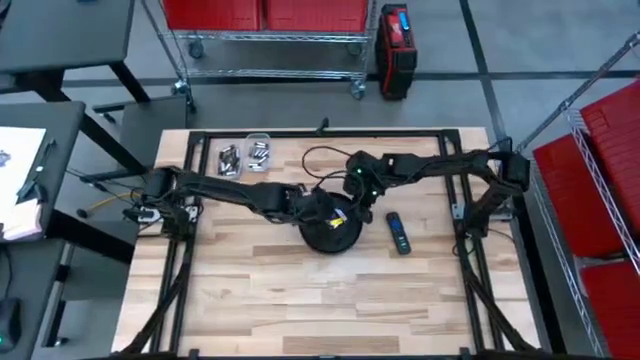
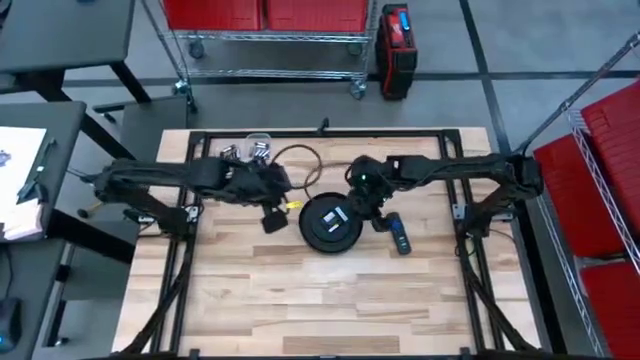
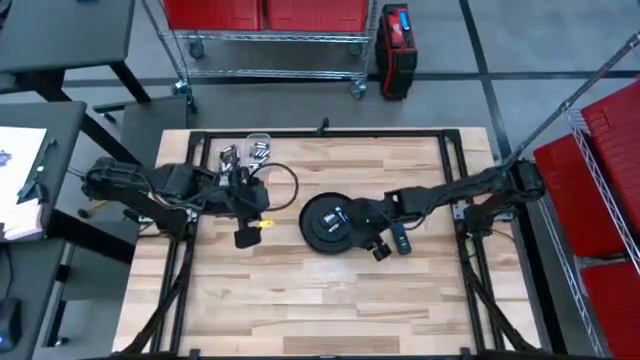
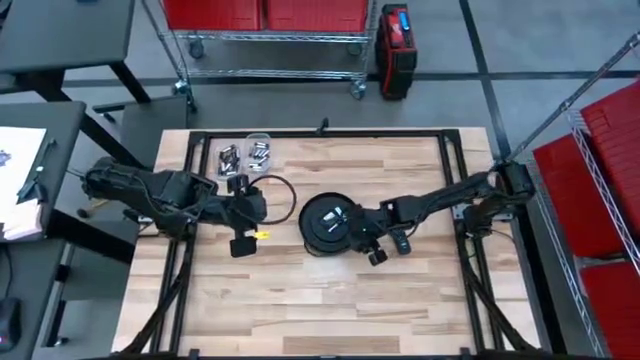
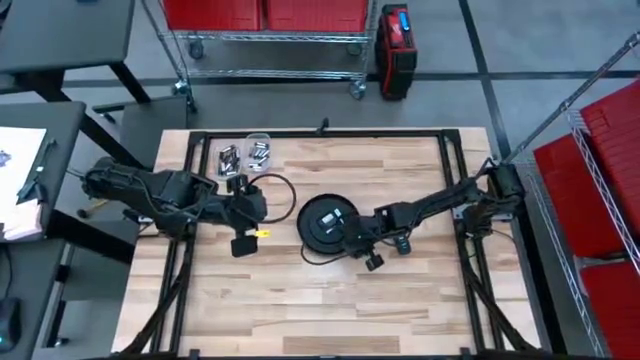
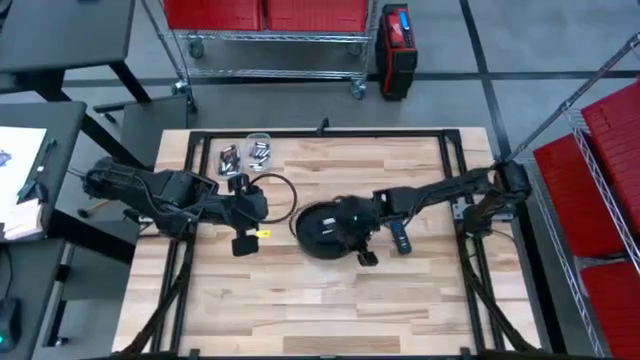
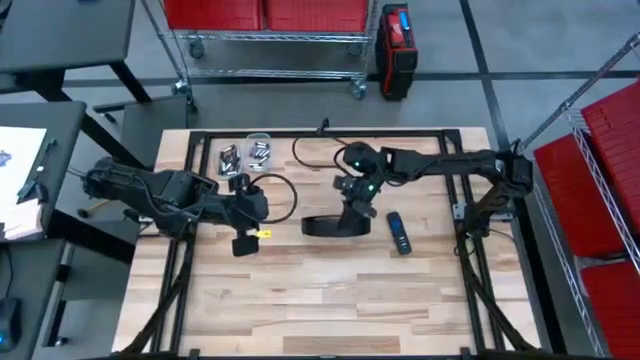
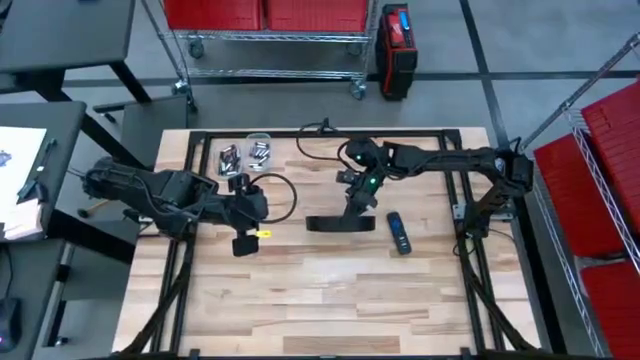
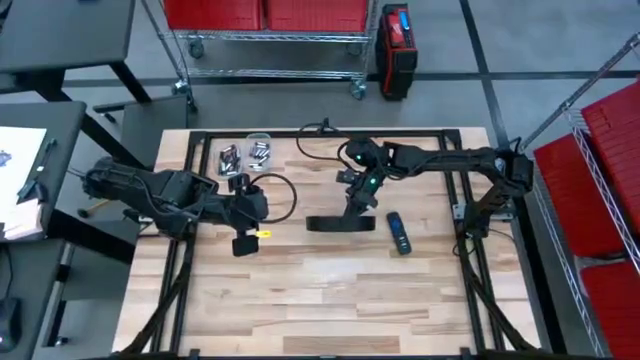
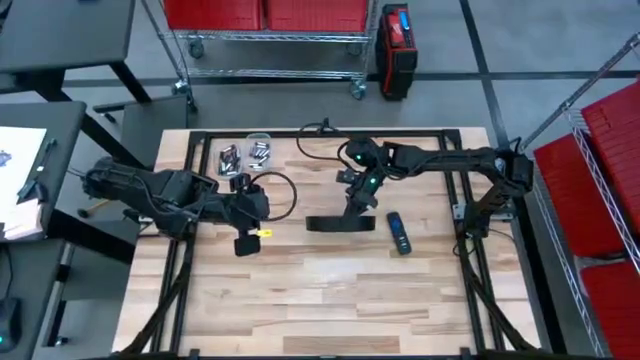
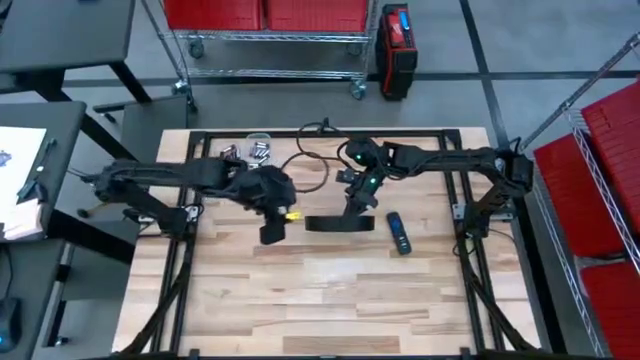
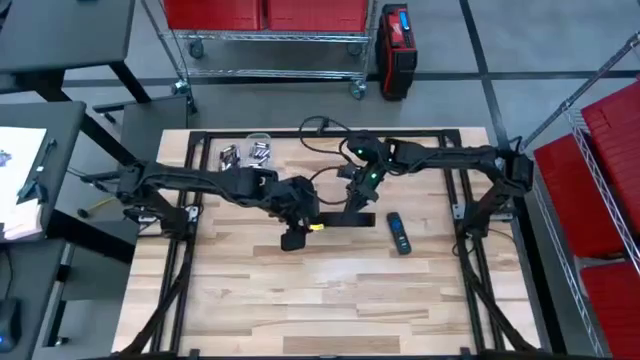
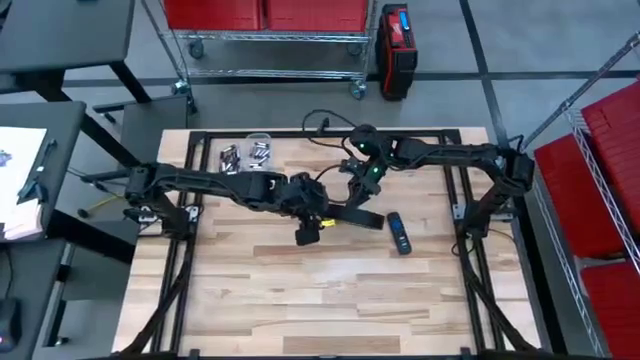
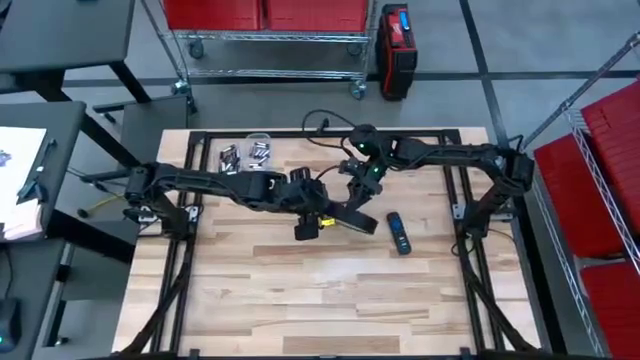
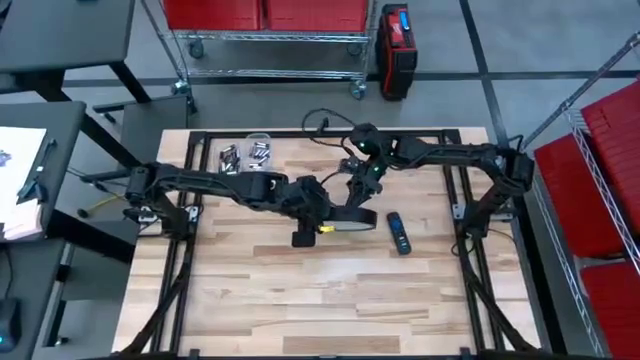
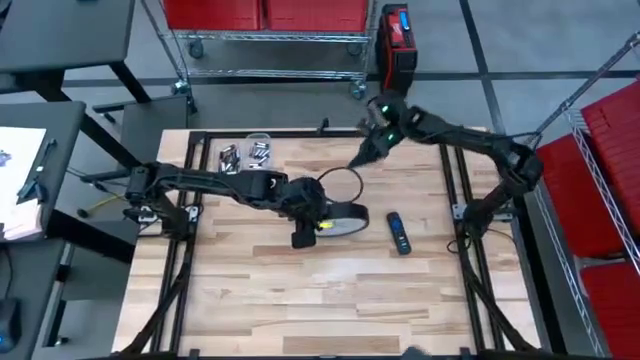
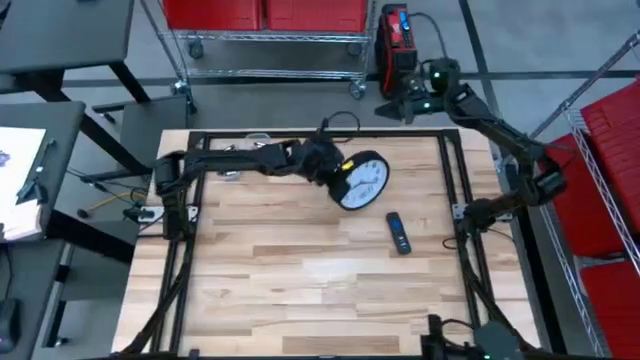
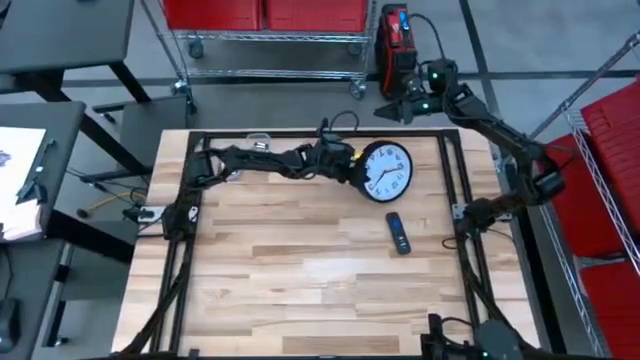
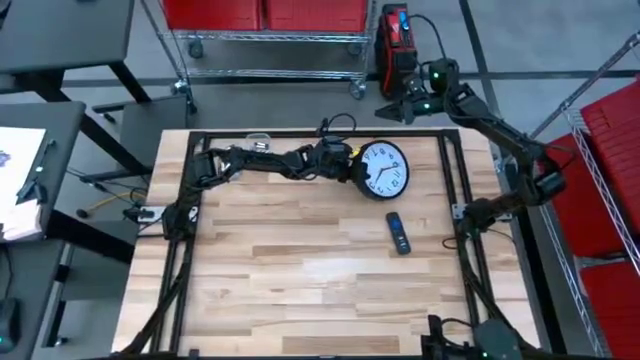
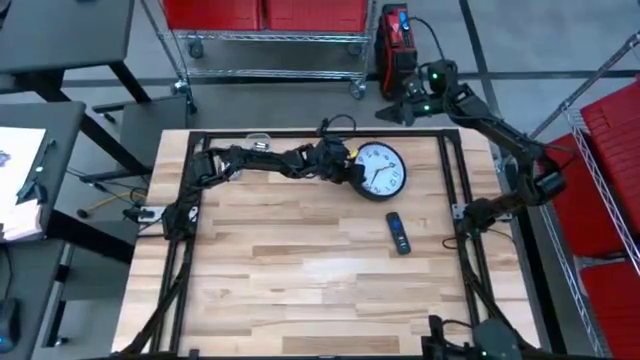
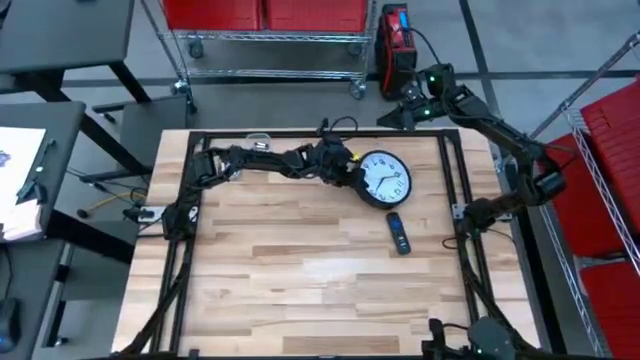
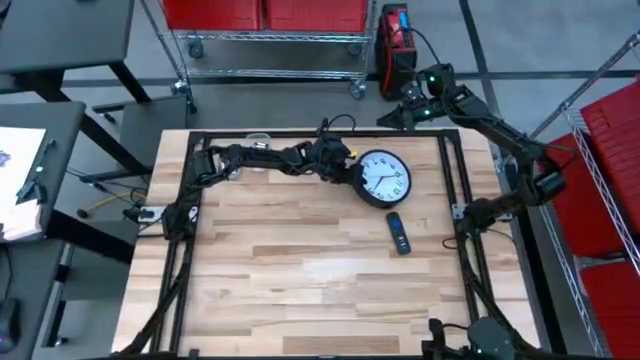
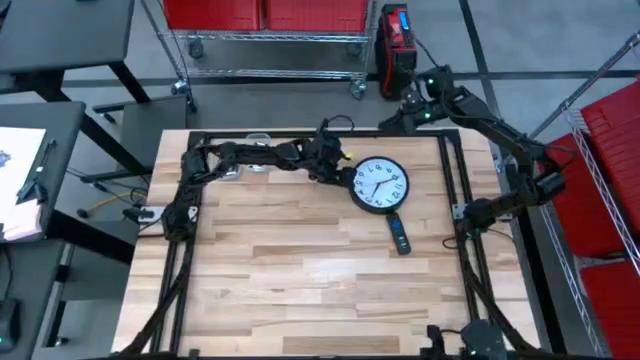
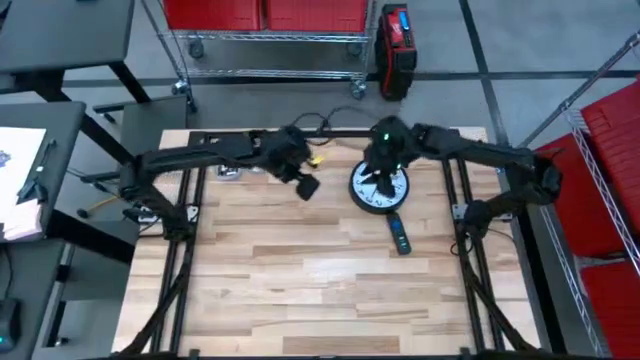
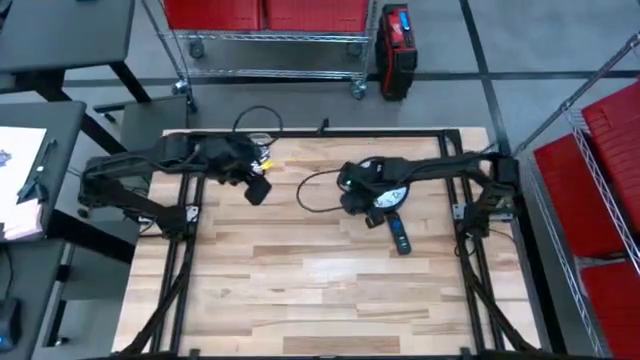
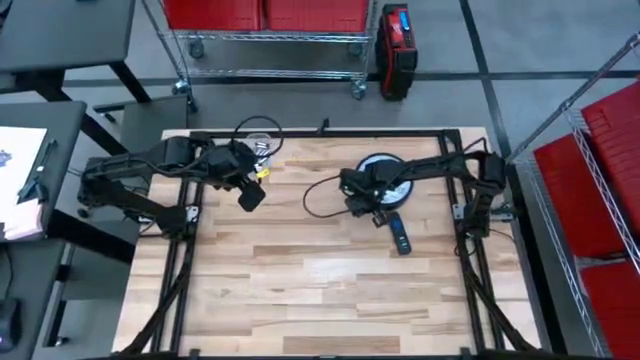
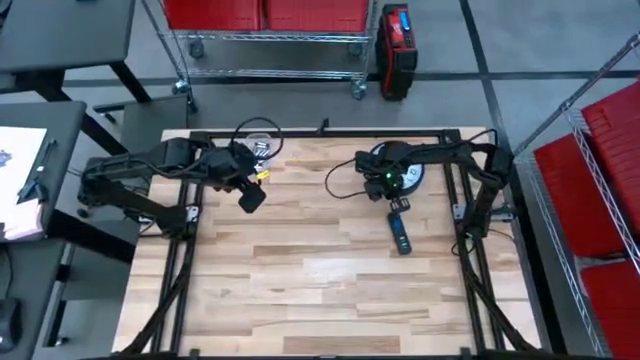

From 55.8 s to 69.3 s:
Task: Insert battery
Move the wall clock to the top right of the table

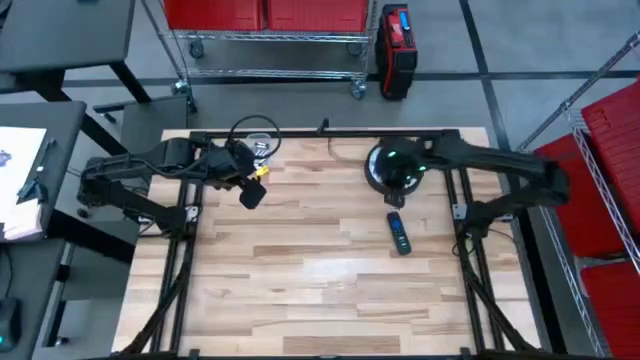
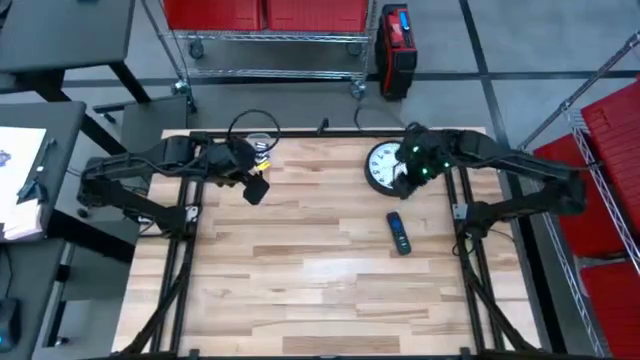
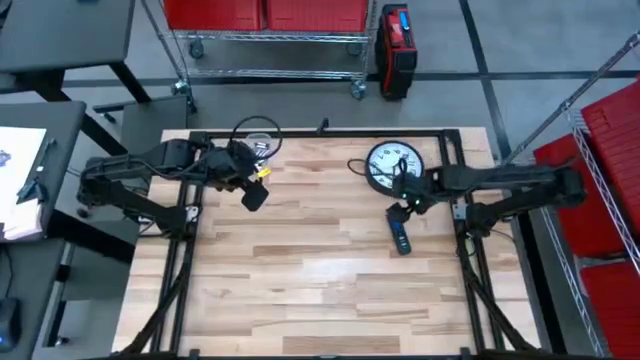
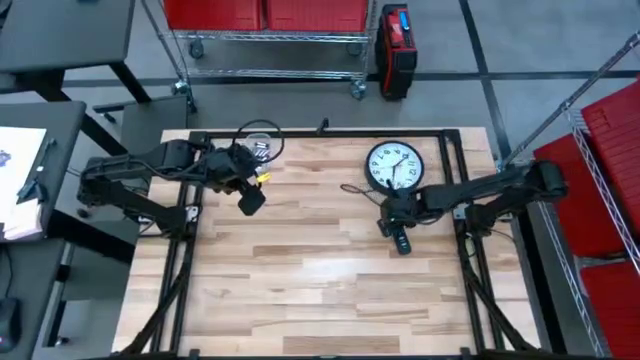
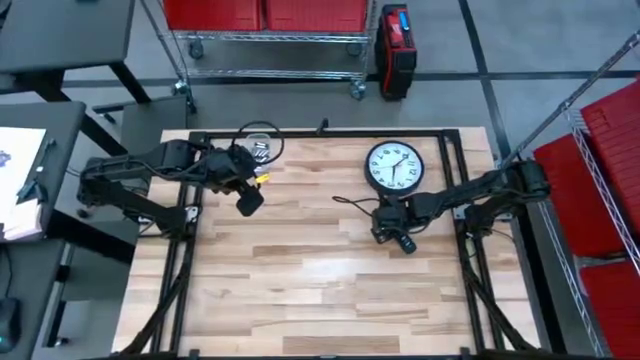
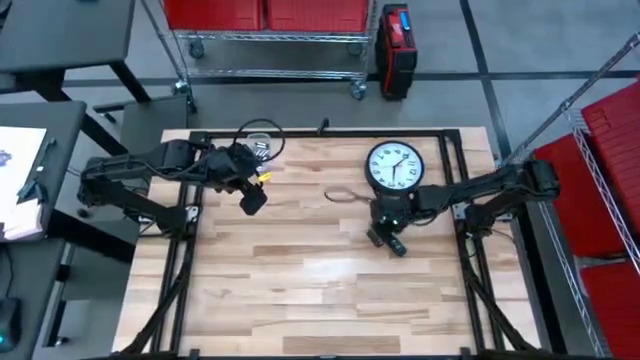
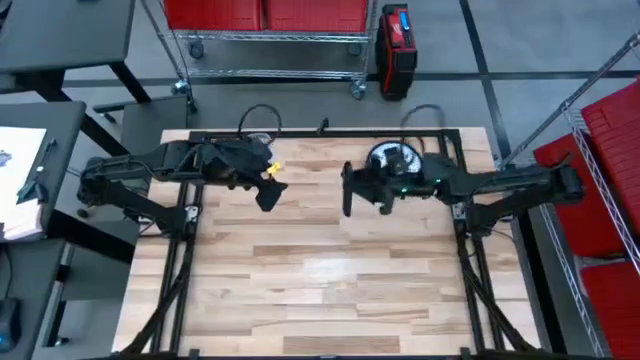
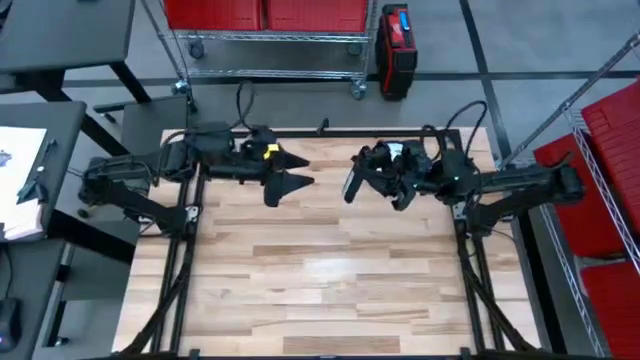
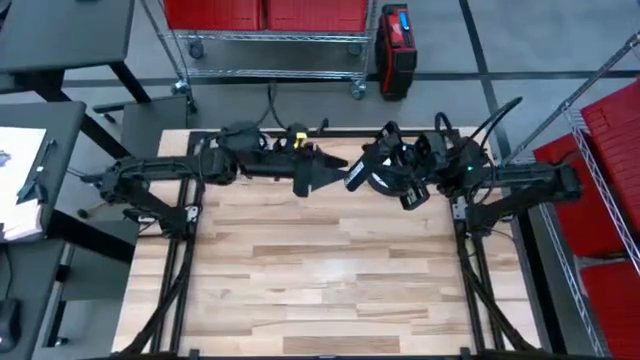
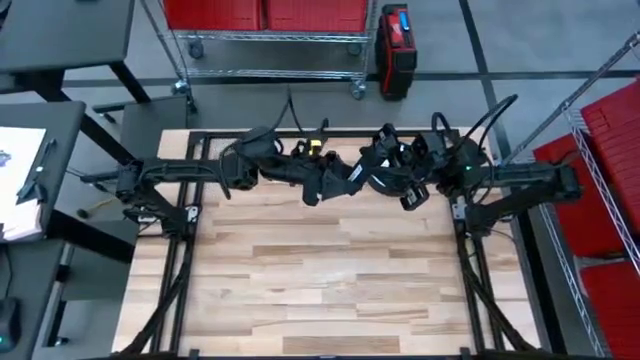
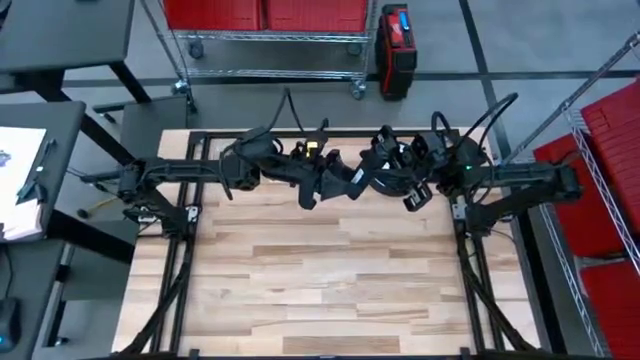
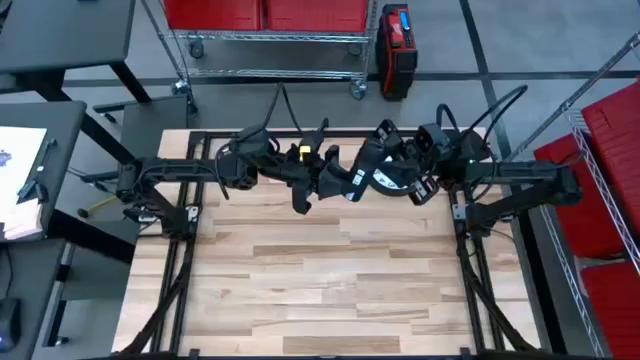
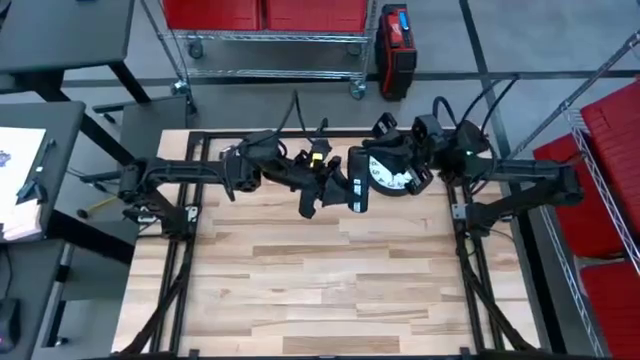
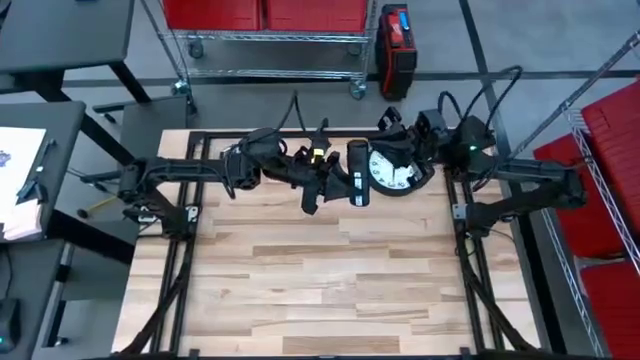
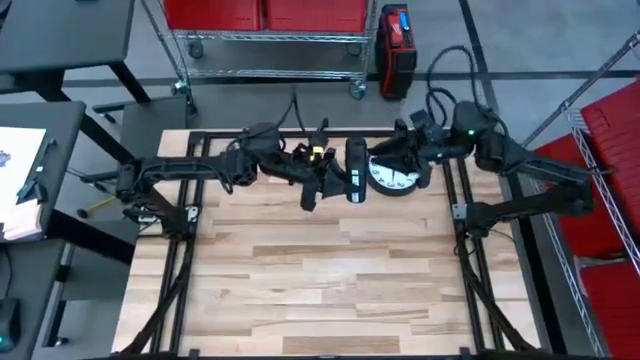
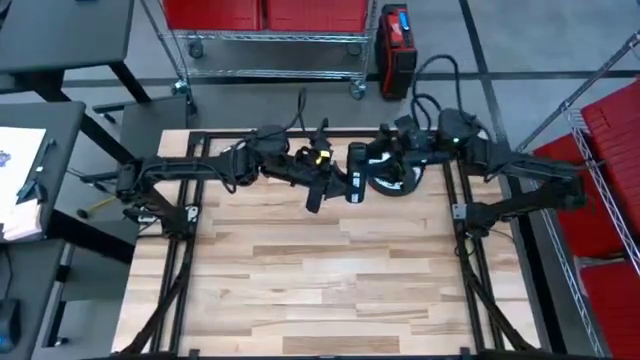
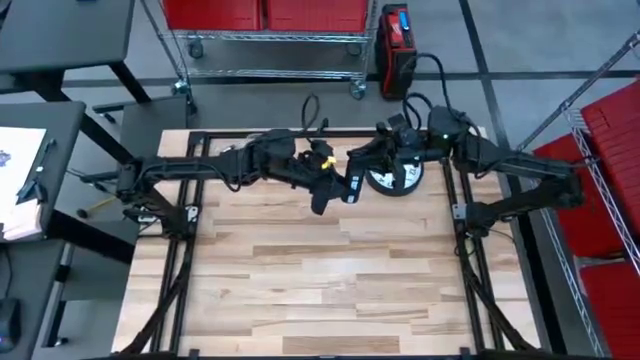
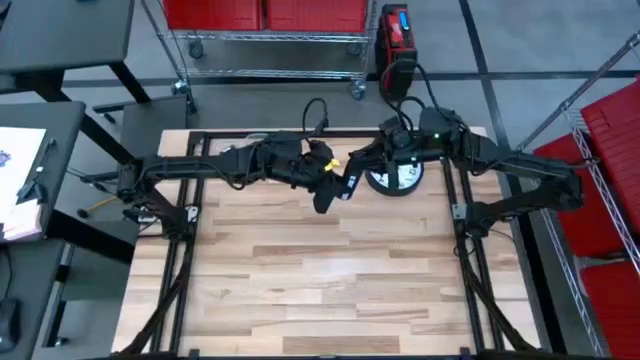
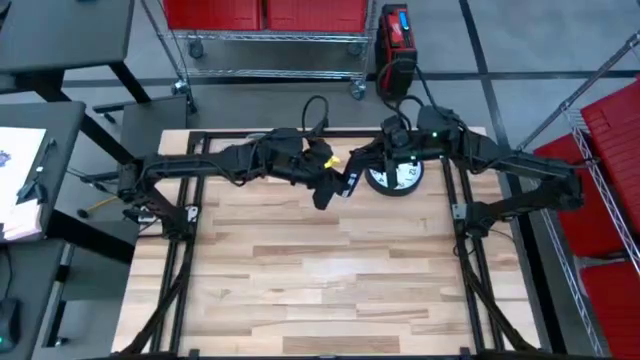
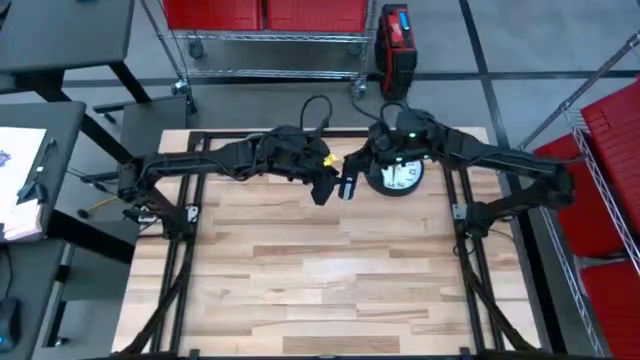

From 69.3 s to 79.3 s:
Open the remote battery compartment
